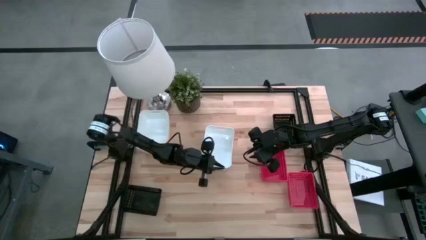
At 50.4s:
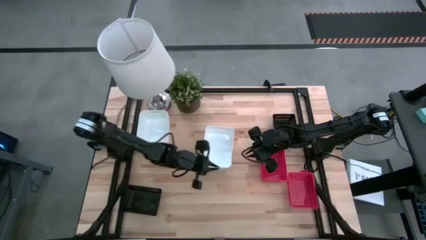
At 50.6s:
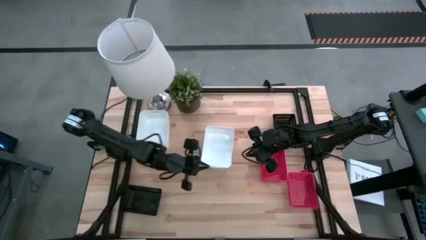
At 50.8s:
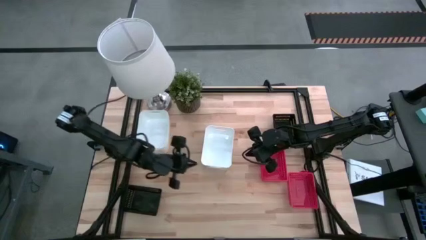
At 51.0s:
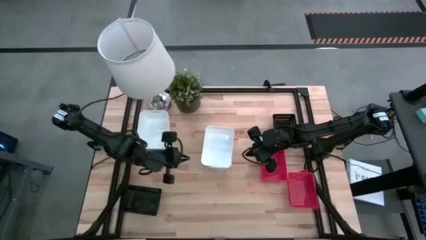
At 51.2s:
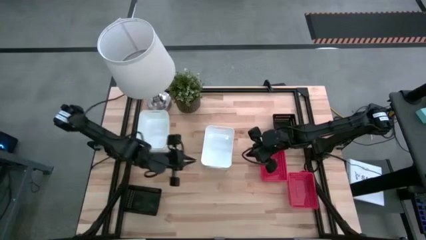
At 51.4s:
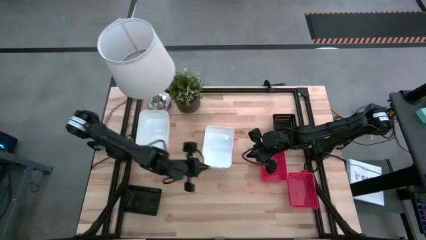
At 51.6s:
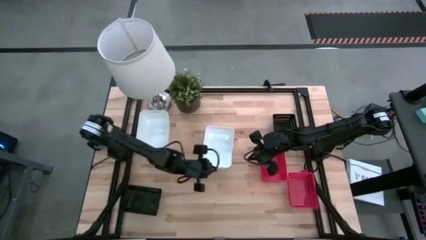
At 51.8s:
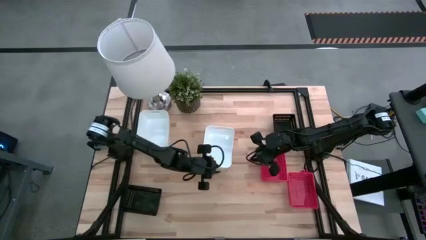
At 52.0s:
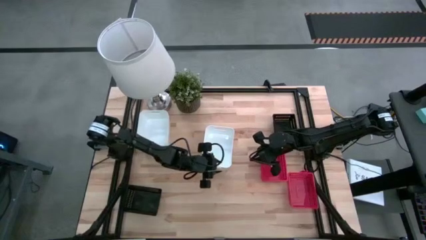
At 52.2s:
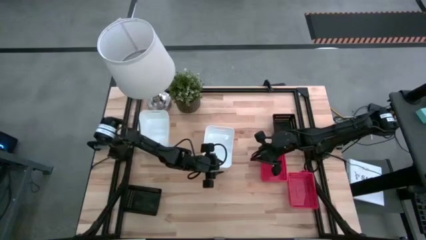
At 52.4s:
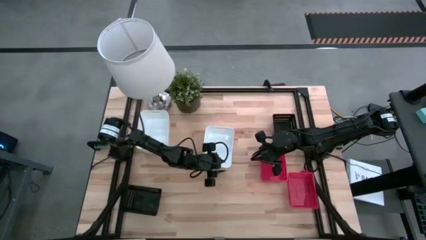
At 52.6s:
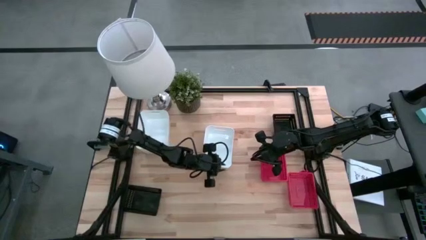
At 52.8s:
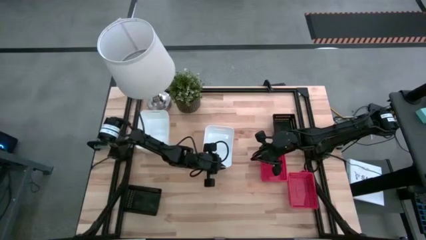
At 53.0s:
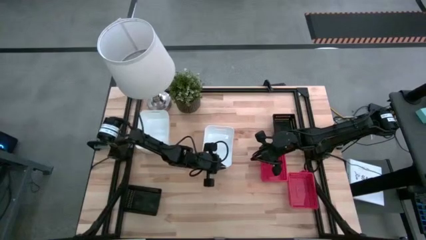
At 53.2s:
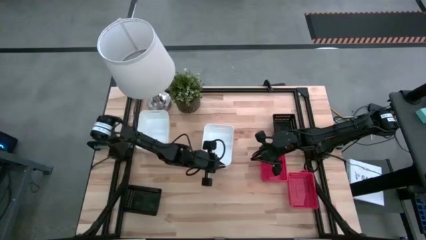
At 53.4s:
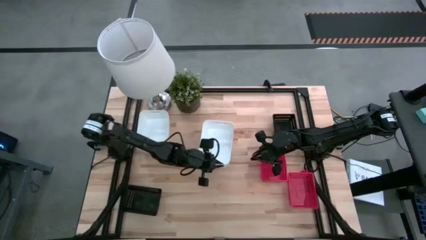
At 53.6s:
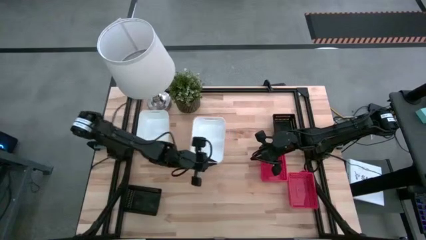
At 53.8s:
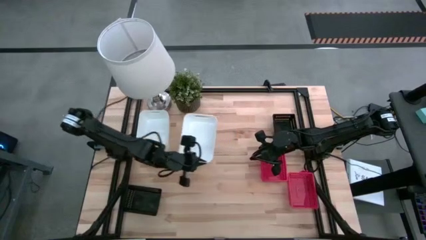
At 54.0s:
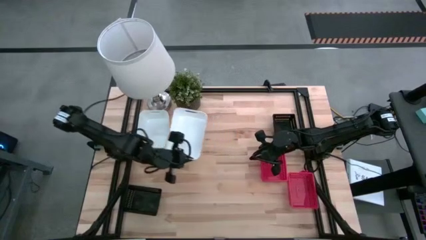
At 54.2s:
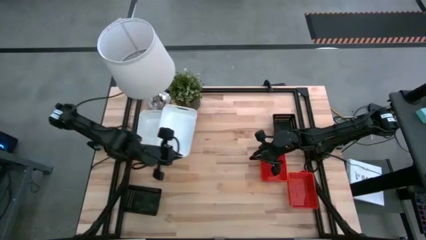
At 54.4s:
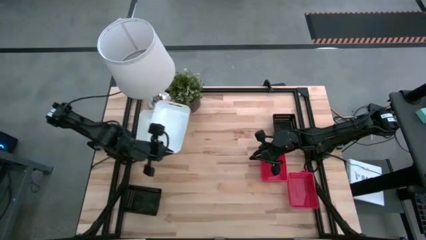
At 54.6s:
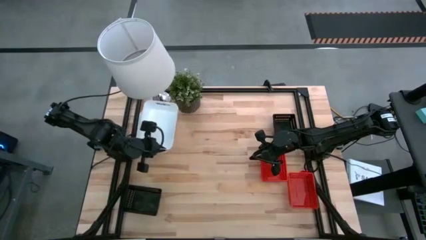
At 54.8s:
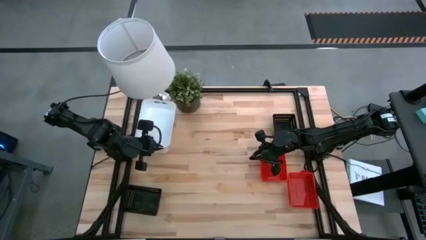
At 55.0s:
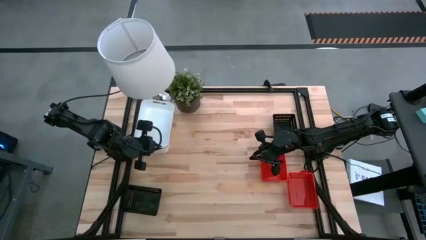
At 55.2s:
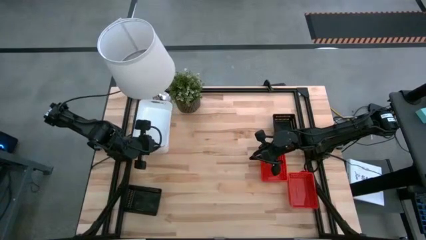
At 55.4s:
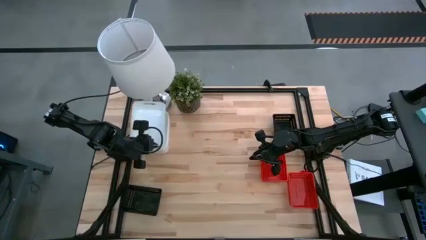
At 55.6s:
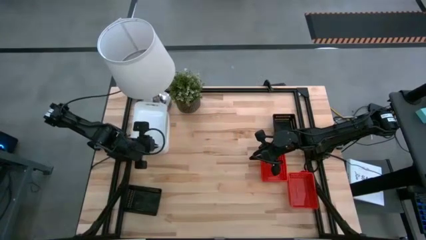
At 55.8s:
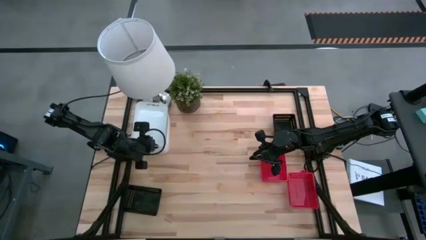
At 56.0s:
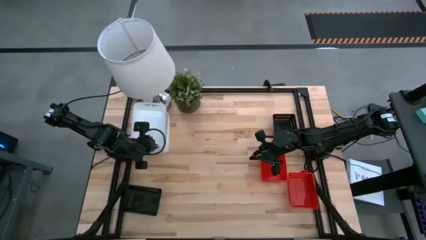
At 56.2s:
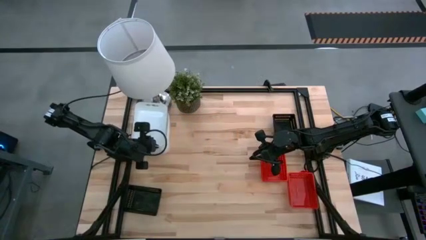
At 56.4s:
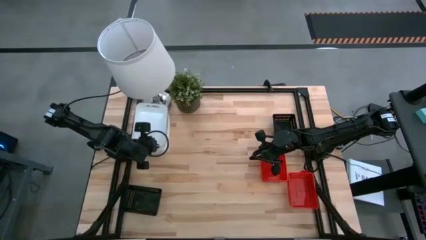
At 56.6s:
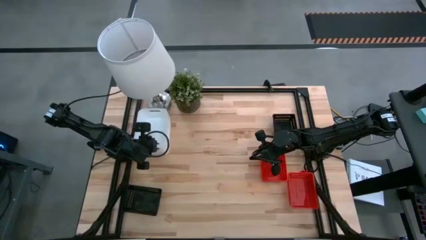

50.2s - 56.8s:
Stack the right white bin on top of the white bin

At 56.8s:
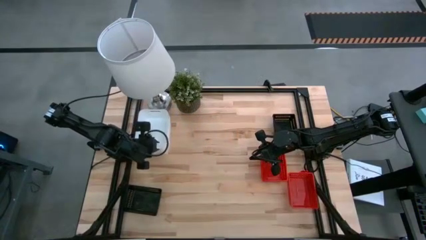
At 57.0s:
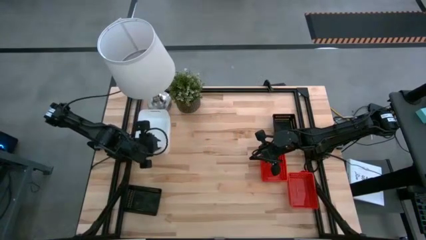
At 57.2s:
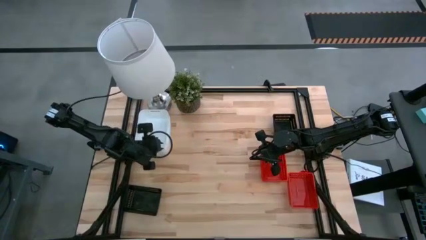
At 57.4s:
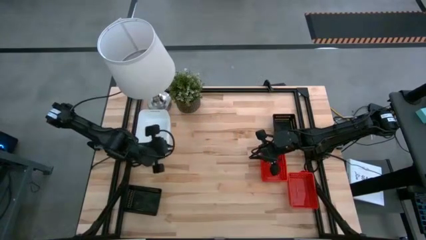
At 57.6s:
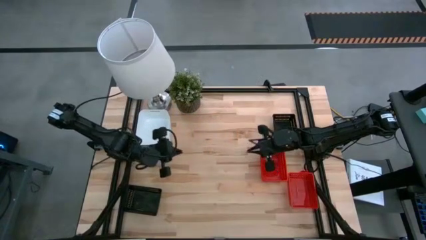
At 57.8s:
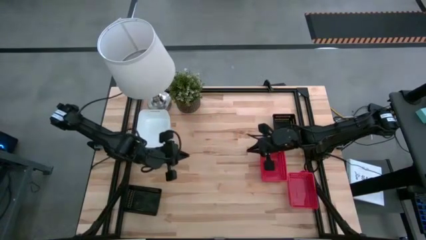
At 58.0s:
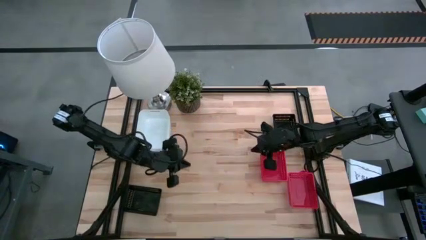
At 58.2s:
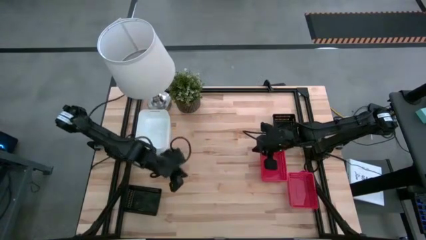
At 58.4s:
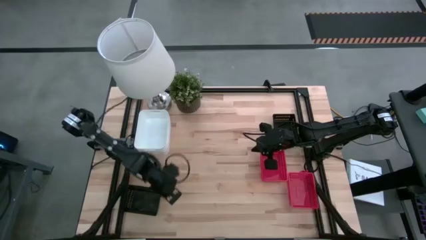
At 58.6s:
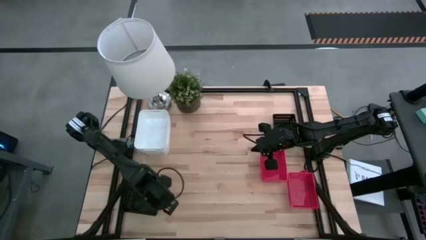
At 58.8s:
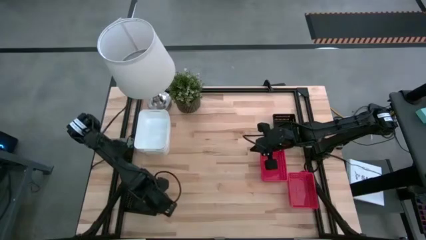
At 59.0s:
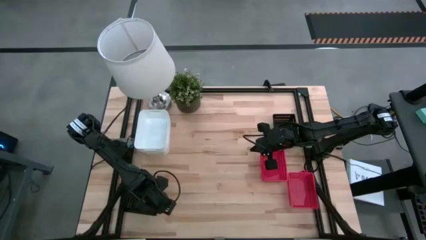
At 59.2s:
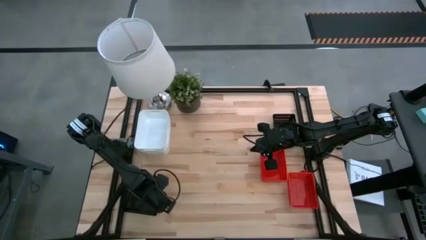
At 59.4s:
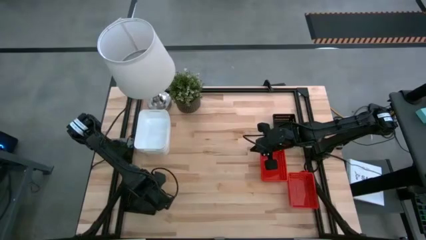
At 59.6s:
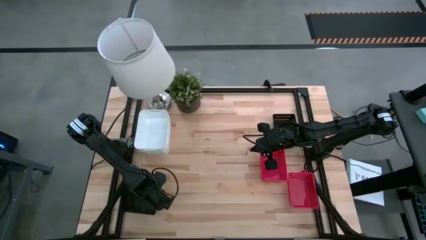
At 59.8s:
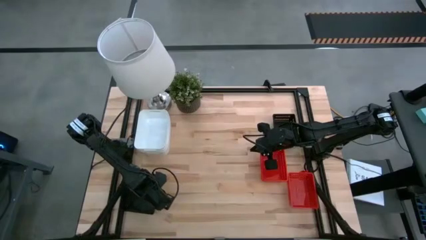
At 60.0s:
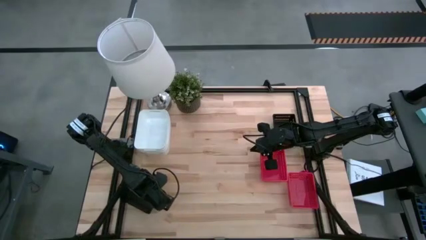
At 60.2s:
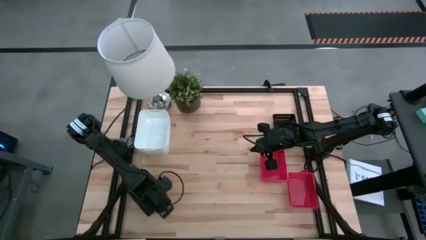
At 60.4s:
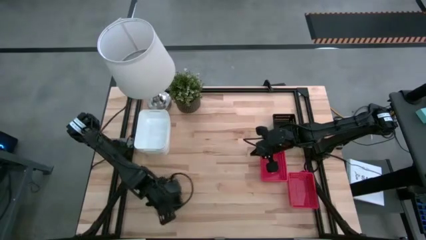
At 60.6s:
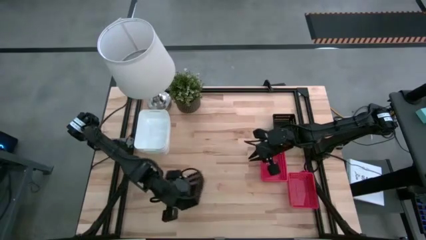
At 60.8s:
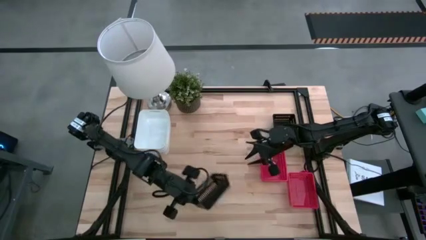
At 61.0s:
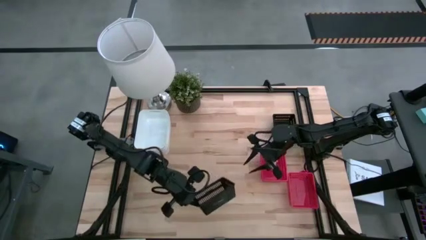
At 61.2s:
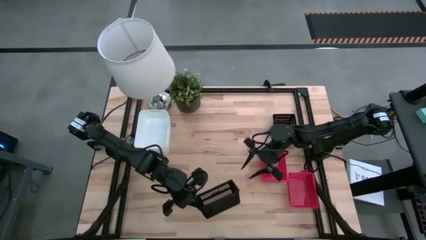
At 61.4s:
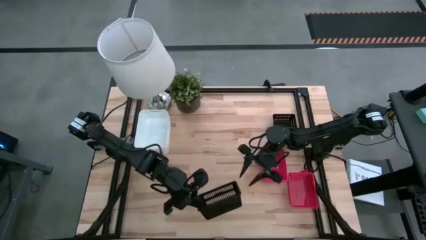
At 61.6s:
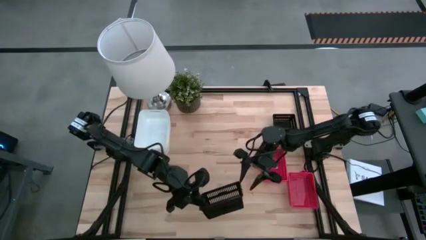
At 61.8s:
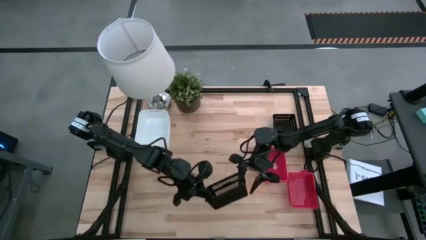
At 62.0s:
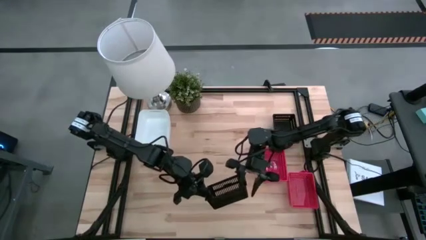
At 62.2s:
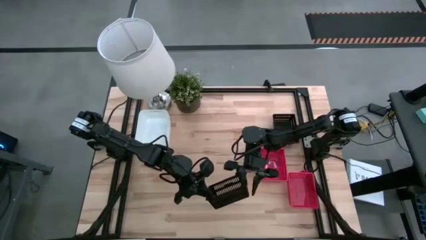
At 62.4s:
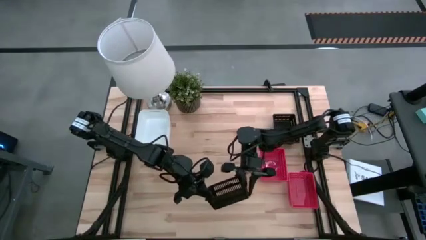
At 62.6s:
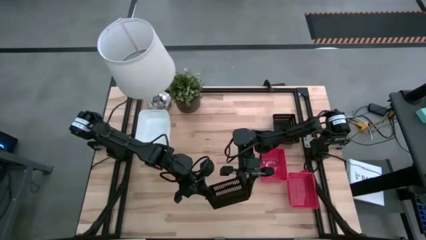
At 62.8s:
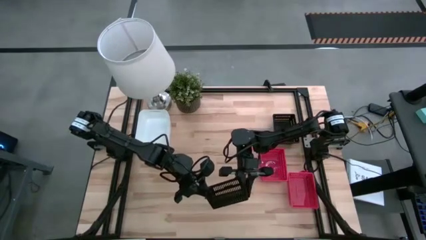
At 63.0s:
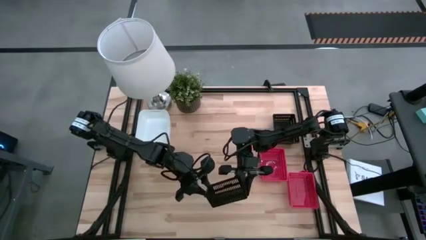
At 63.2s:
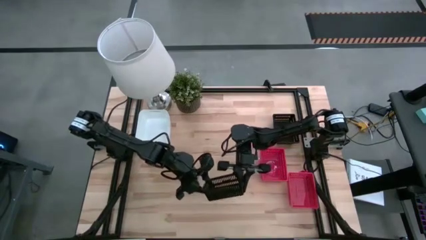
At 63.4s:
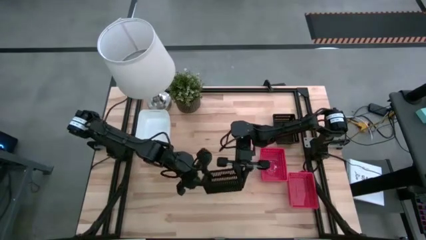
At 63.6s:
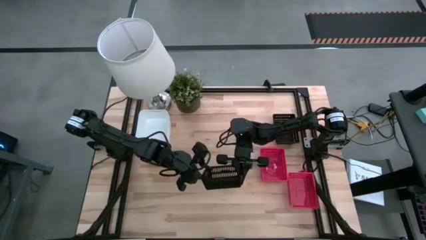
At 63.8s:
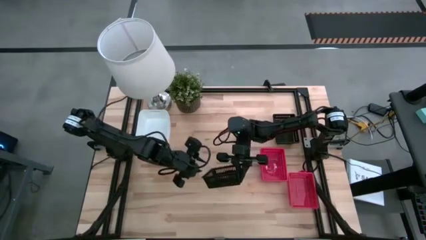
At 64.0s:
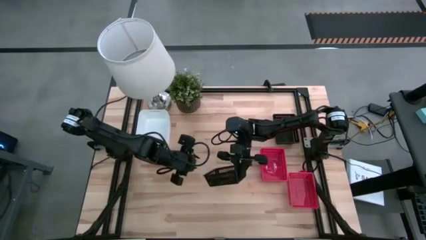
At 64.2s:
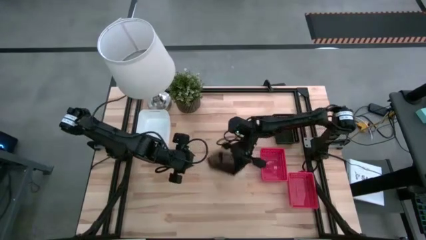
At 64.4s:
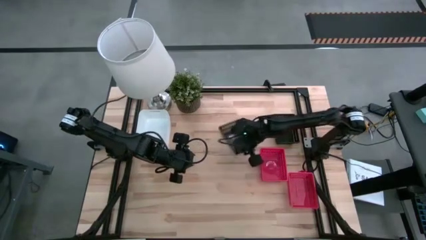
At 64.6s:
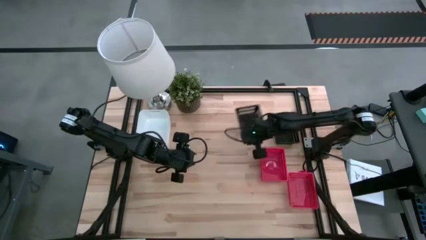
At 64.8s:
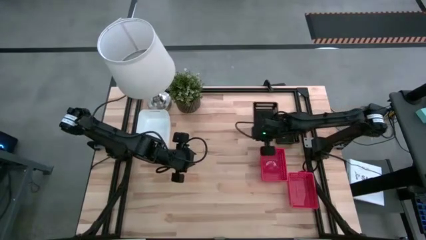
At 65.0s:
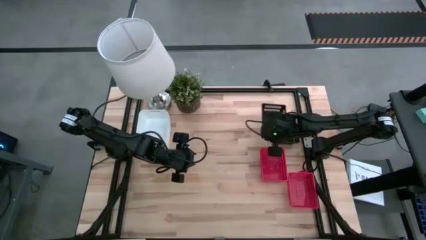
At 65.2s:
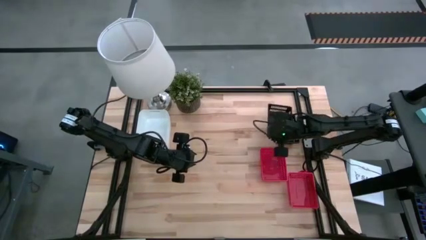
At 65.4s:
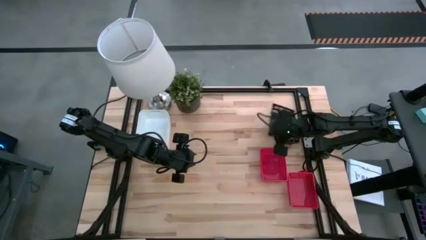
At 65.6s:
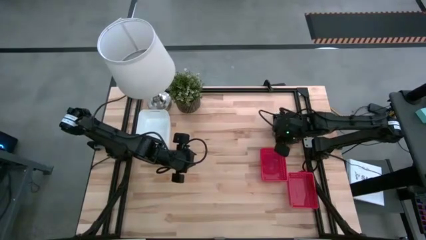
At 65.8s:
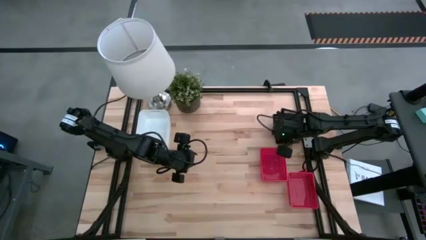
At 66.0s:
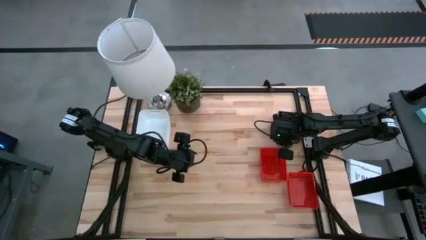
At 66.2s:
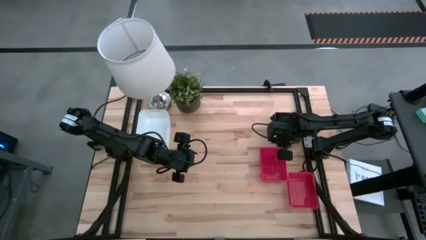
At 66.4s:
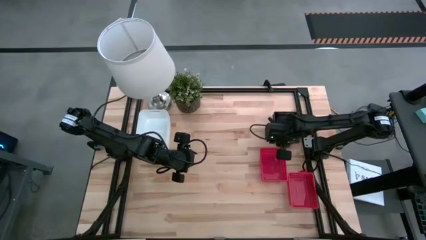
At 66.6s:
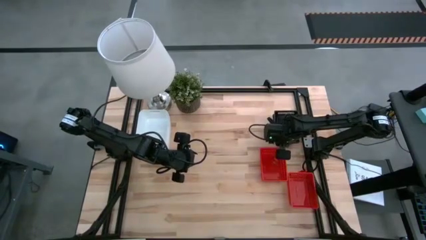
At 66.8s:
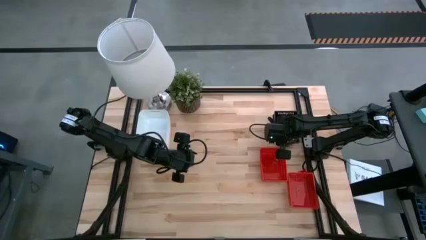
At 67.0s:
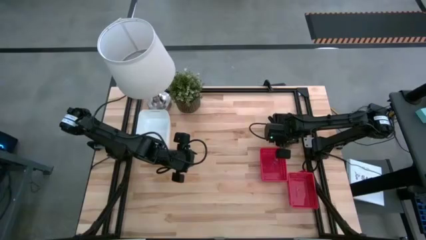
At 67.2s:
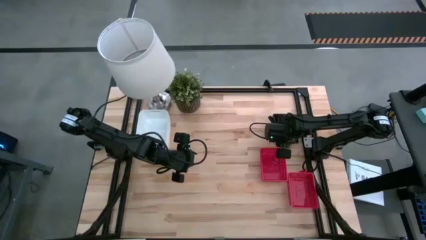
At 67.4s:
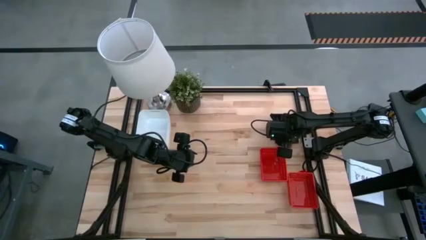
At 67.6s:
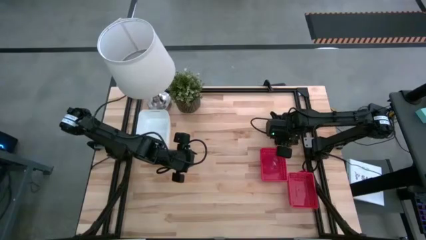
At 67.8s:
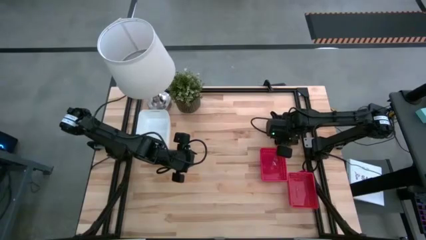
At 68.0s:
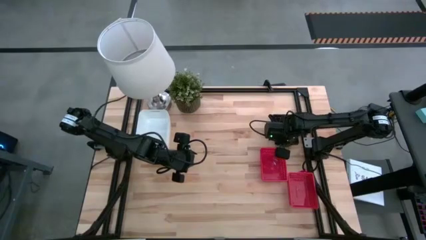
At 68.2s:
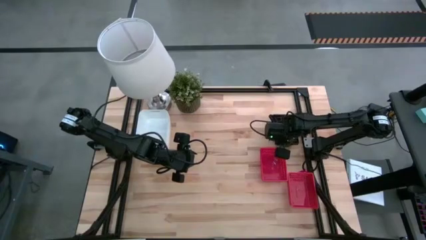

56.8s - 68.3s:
Stack the bottom black bin on top of the black bin
